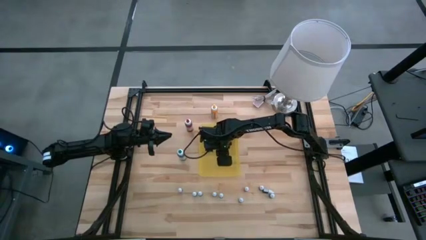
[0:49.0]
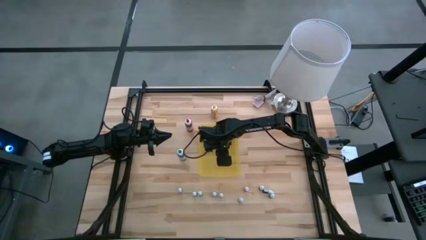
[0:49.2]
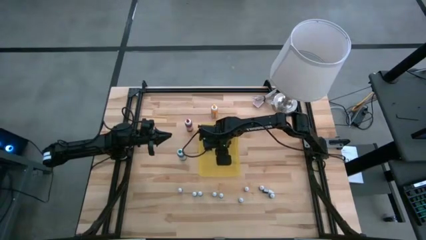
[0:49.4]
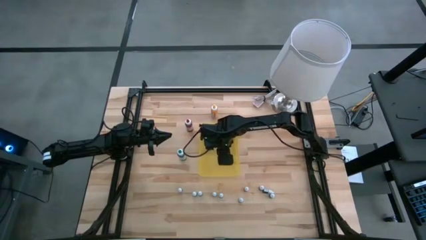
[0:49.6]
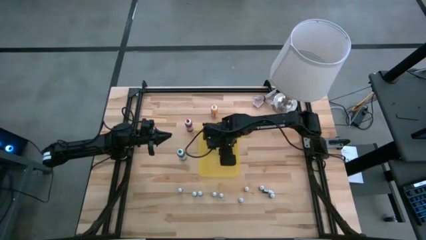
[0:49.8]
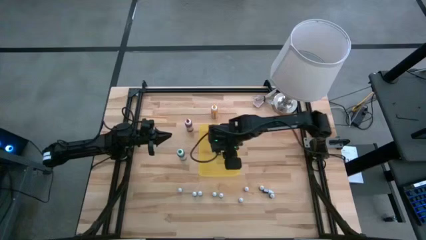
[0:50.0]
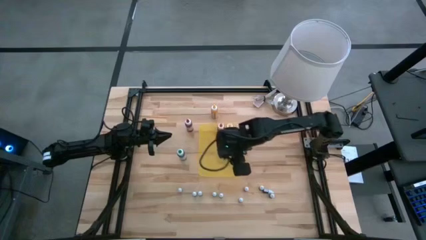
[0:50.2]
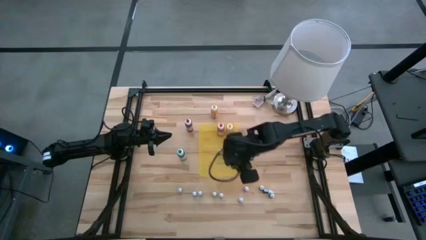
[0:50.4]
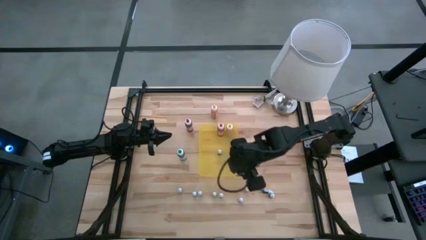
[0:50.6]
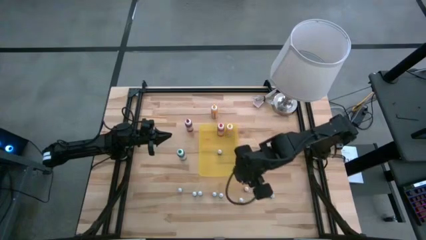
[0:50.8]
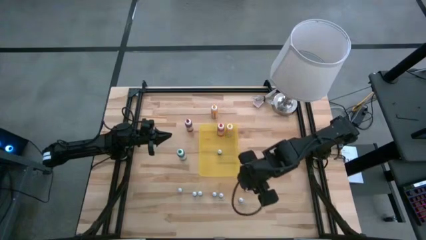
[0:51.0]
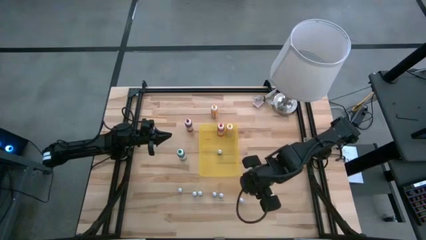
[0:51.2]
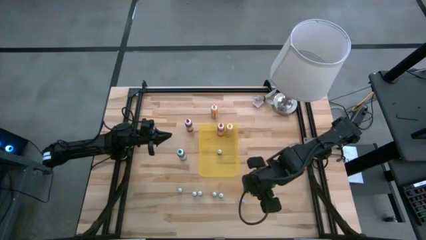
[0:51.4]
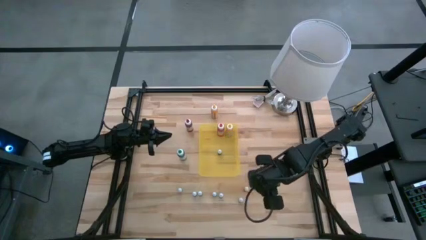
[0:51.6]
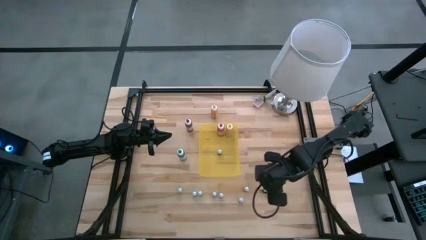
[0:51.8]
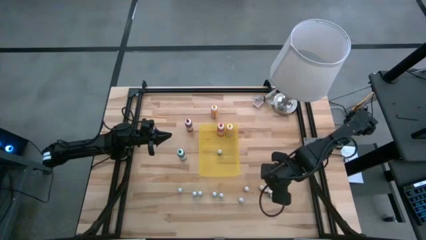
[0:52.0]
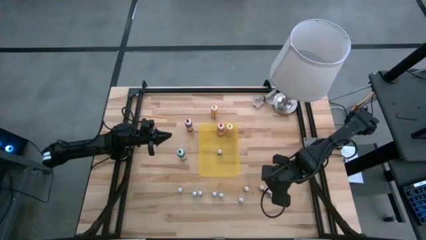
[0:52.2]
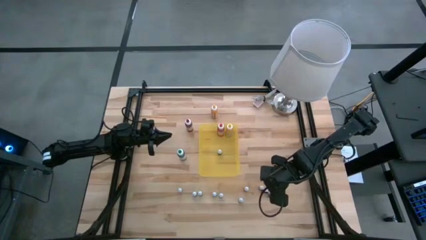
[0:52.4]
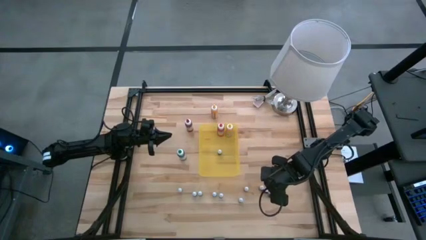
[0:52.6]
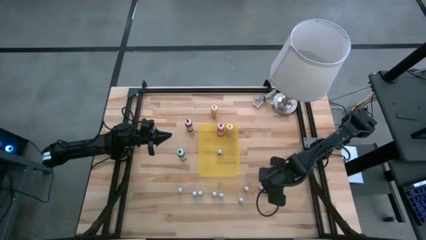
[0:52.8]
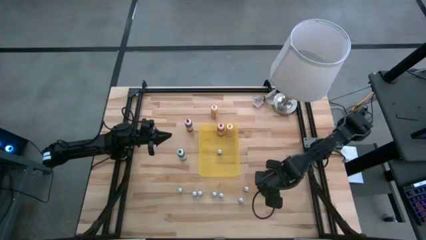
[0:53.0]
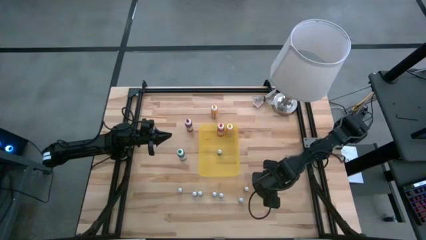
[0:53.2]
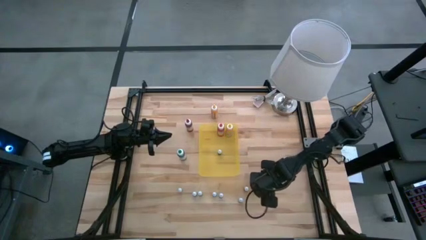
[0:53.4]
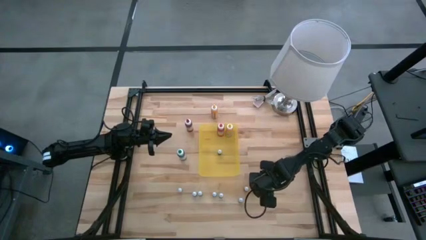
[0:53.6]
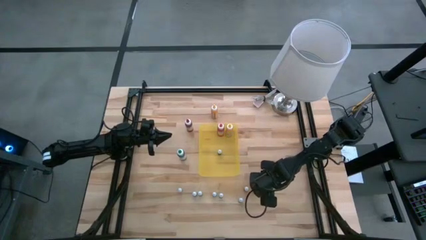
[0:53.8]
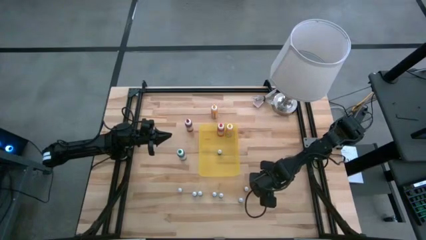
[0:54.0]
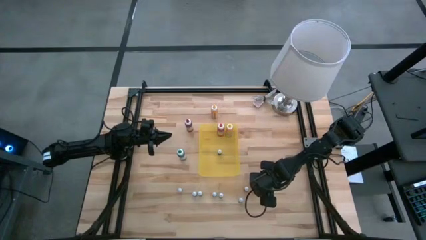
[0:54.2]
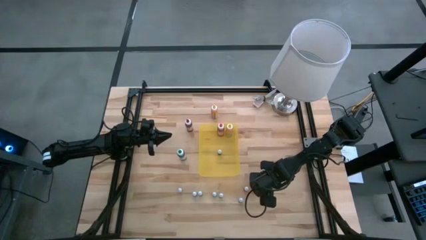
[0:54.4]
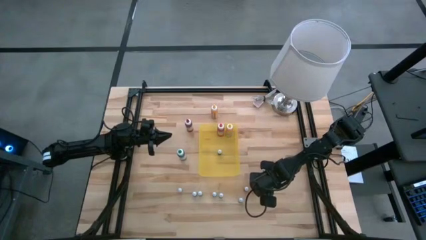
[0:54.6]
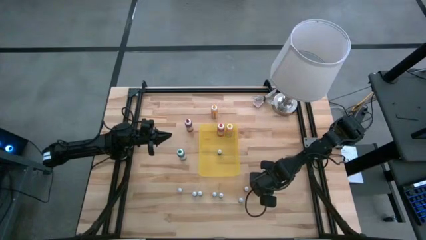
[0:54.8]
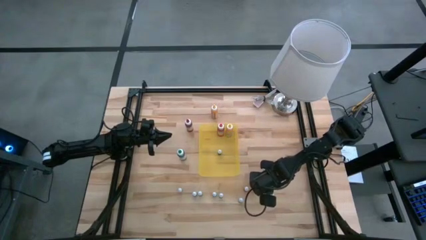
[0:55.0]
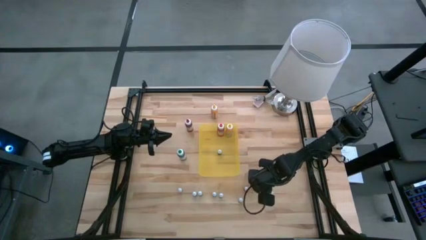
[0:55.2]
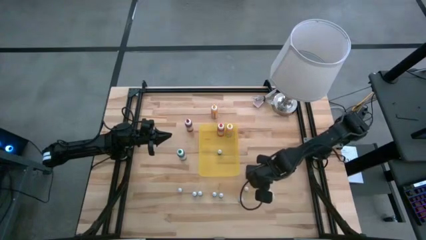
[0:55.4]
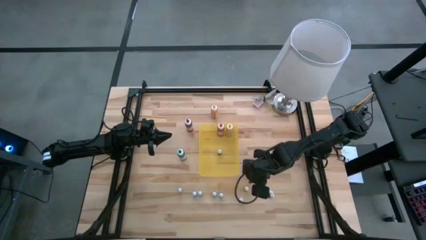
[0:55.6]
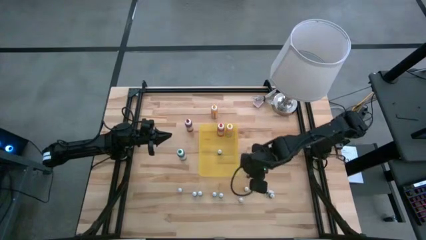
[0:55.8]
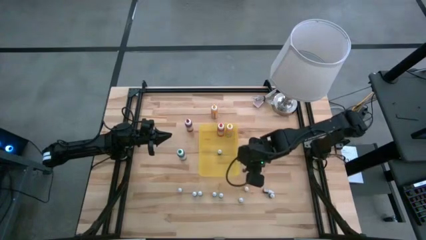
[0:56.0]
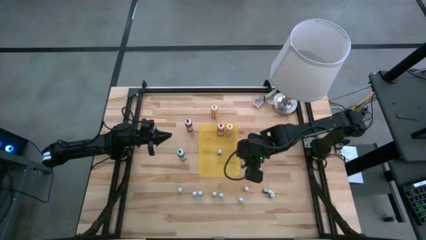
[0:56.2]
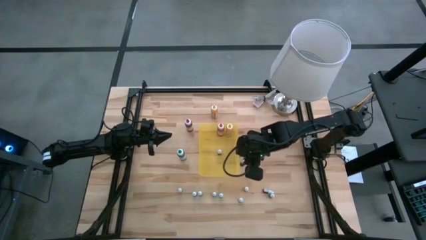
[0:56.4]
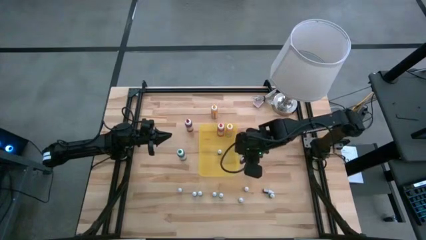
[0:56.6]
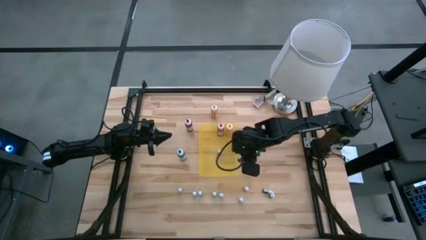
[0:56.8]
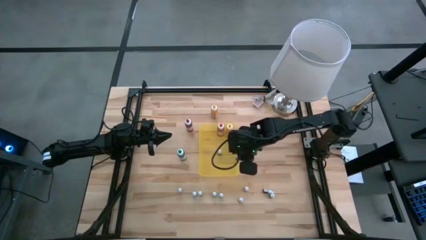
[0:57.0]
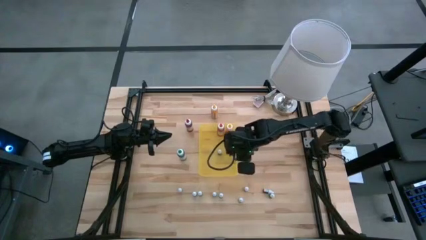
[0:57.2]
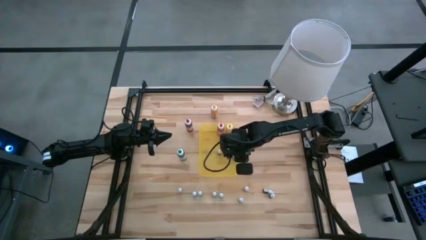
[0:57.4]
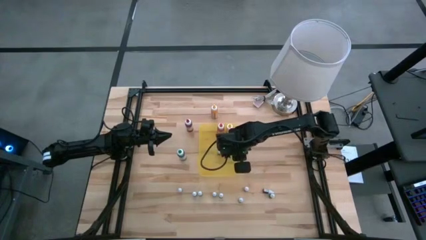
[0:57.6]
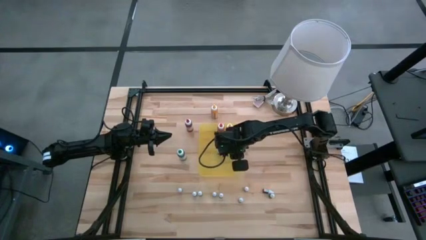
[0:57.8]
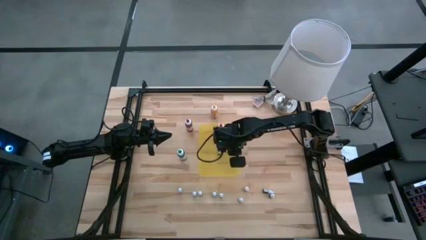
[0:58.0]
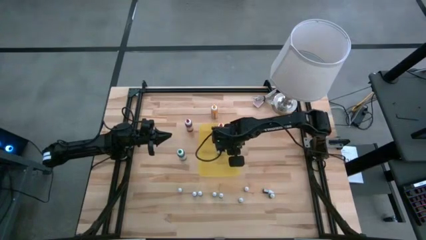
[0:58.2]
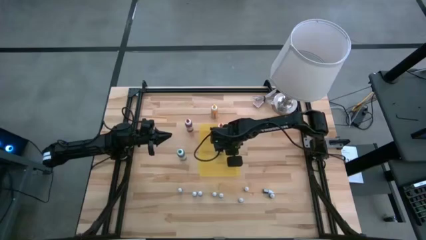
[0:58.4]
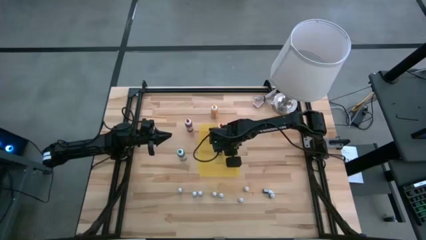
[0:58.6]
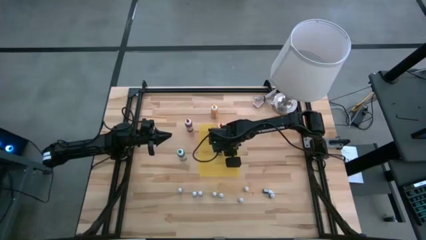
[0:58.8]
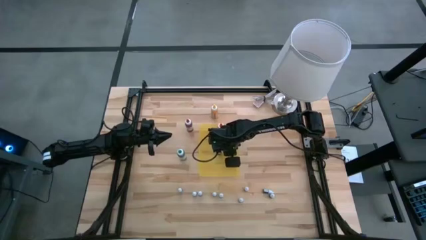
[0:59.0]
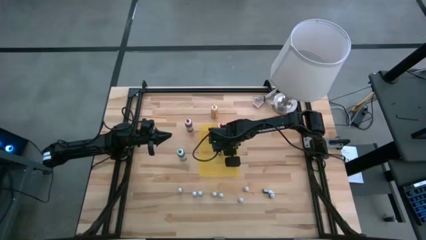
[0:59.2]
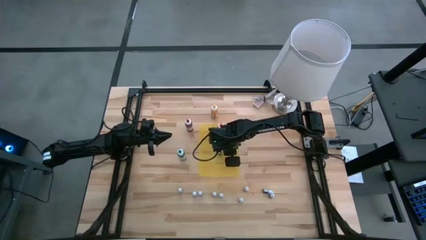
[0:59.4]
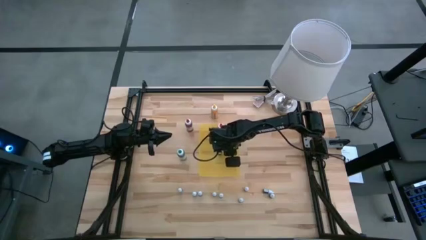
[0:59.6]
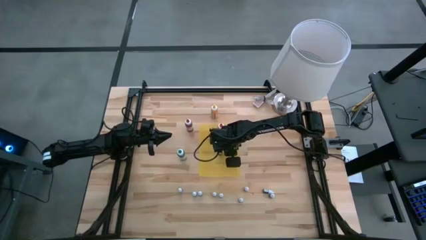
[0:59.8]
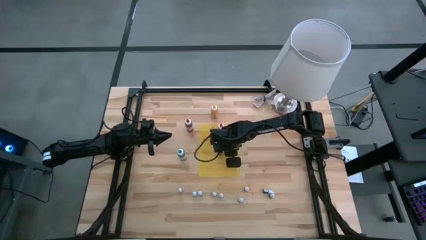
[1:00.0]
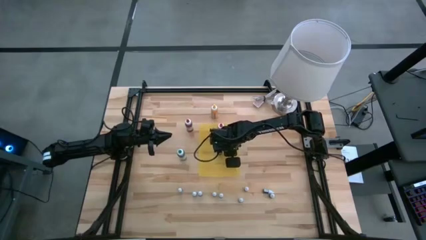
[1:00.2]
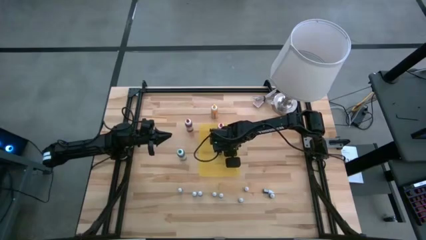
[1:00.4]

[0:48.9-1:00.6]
Task: Pick & Place food coloring
Put the small black food coloring bottle into the bin

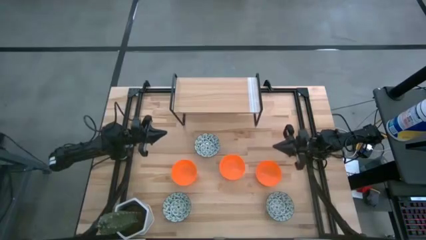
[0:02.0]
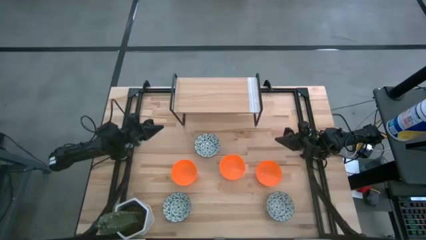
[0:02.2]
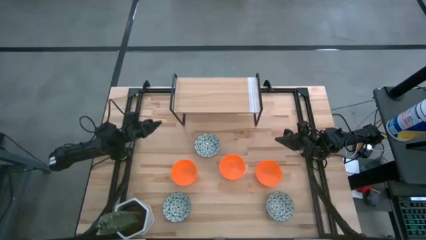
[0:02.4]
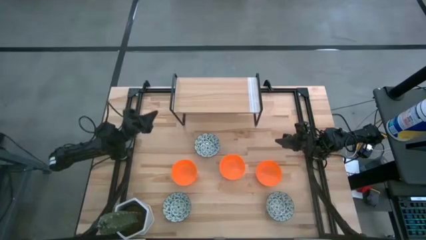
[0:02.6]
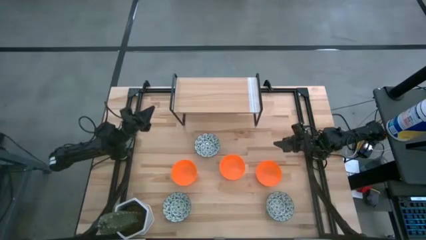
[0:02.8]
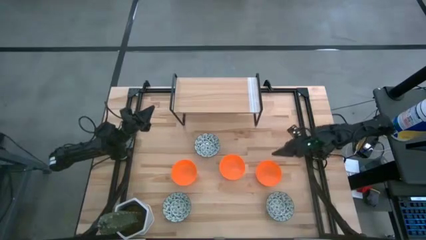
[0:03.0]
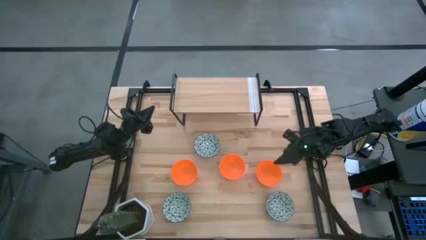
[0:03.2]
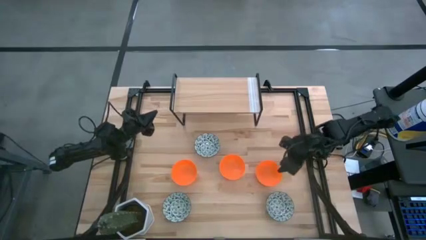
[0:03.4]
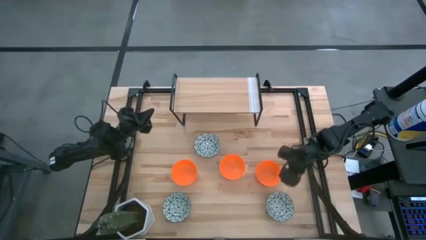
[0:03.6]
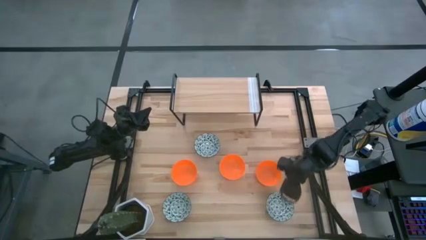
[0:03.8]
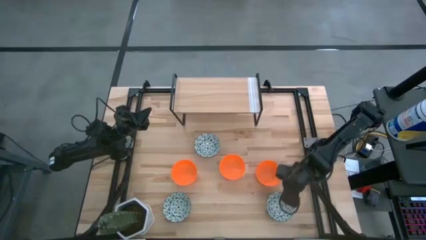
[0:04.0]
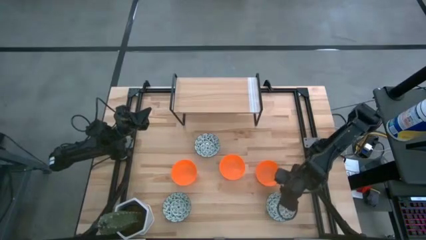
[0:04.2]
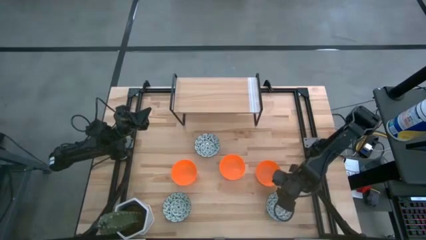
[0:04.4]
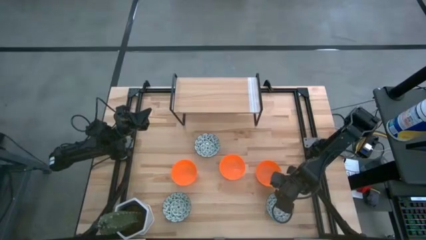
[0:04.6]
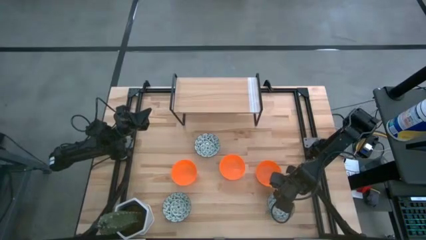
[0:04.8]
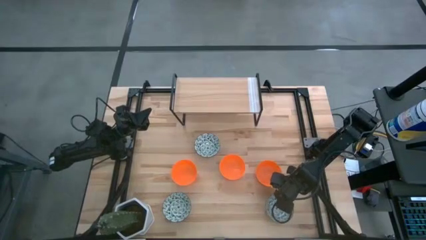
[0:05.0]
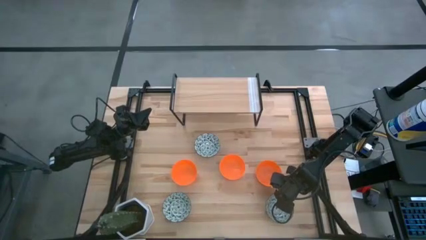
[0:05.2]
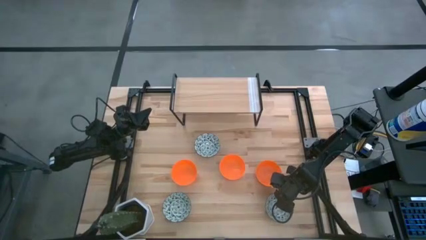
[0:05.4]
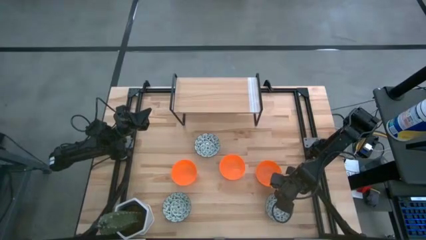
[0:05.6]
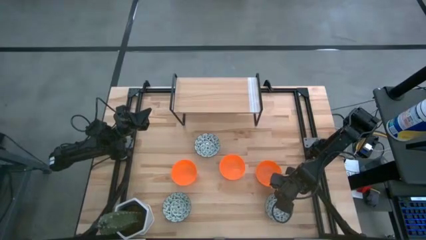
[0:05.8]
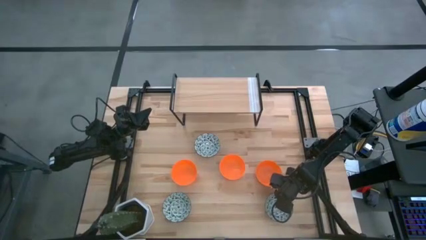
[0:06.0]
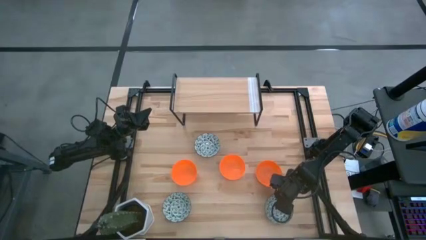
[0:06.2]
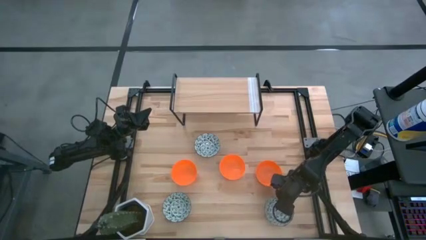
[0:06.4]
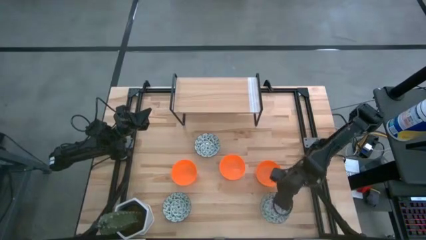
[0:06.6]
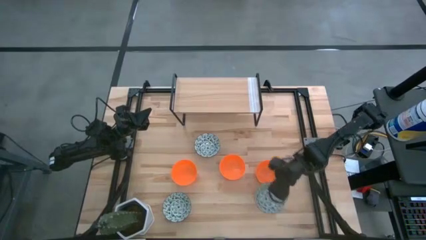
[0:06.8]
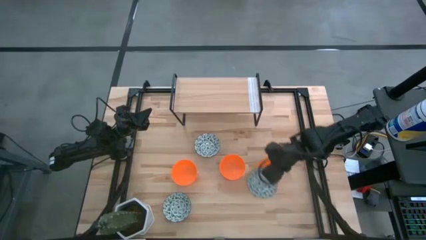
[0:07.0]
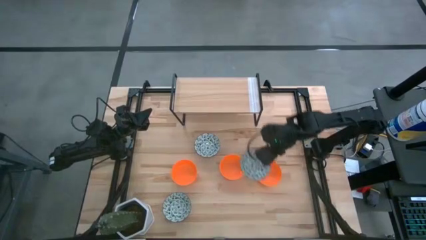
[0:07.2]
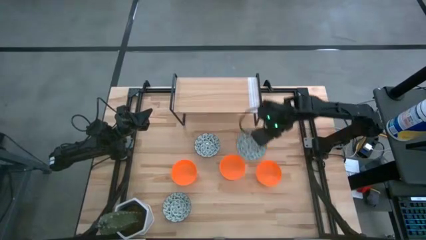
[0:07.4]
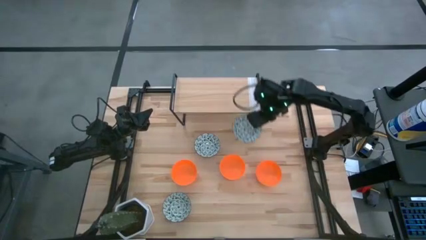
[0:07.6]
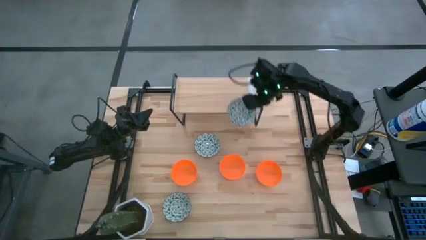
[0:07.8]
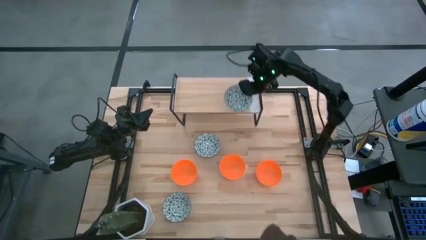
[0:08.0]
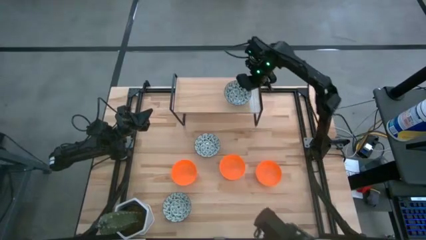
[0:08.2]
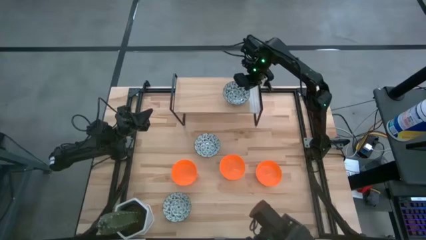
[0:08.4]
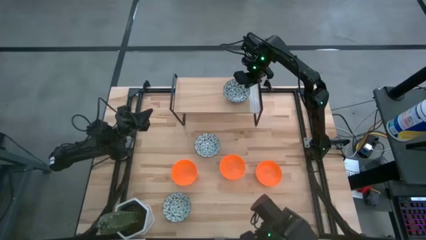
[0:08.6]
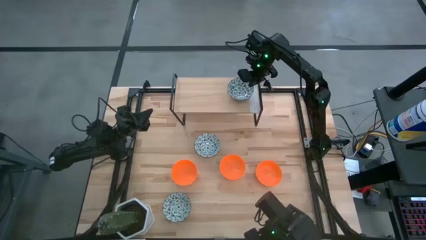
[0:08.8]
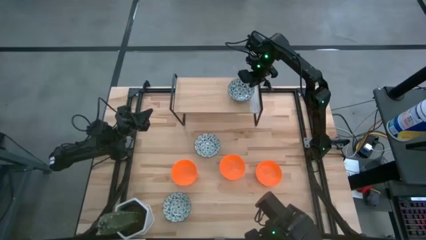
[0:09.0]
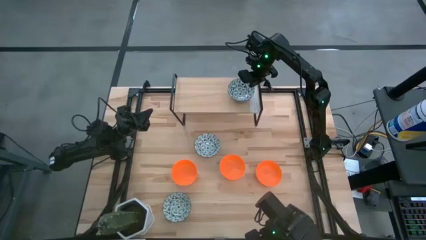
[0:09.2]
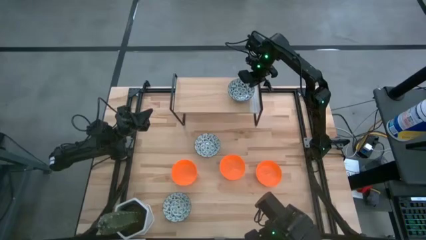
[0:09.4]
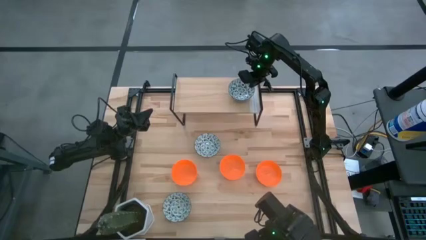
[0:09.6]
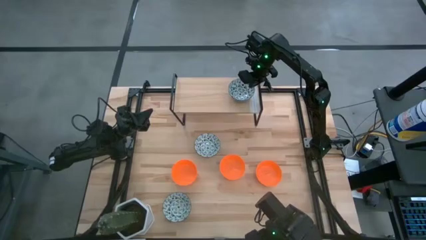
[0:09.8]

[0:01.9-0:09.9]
Task: Pick & Place Mini bowls
Put the bottom right light blue patterned bowl on the shelf
